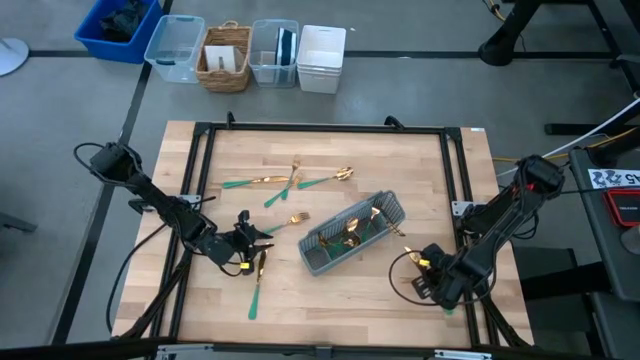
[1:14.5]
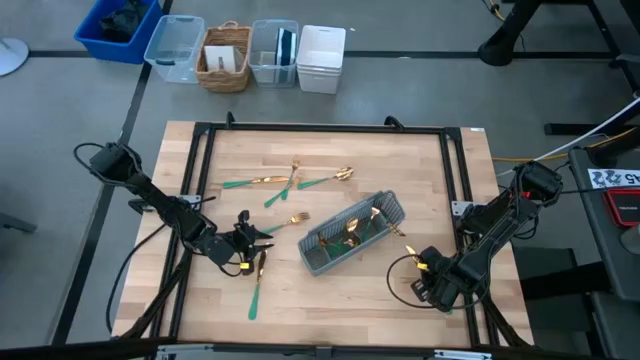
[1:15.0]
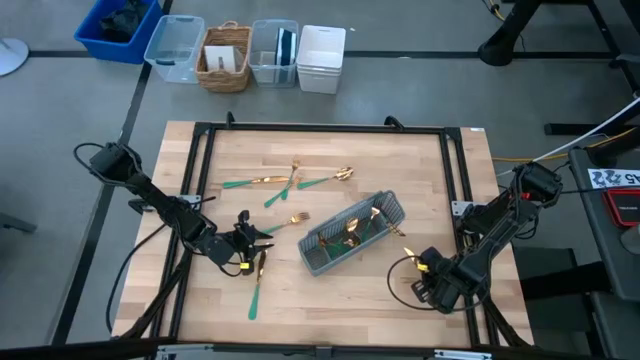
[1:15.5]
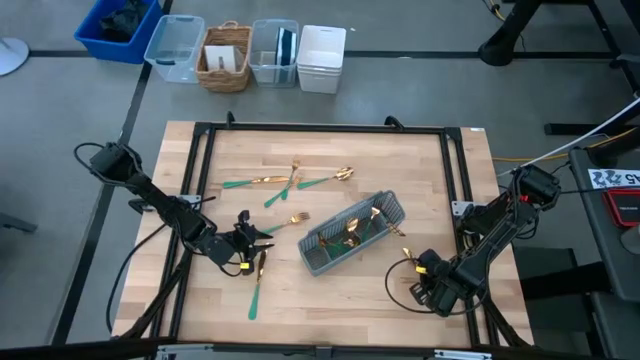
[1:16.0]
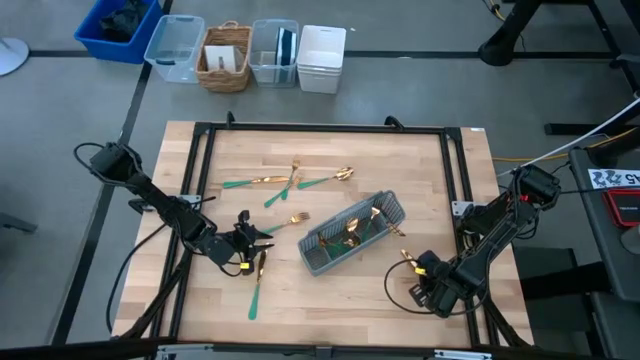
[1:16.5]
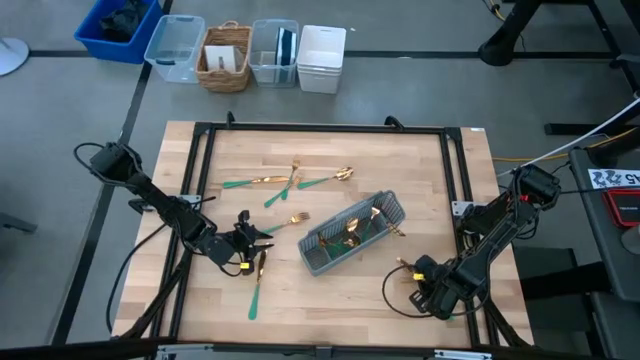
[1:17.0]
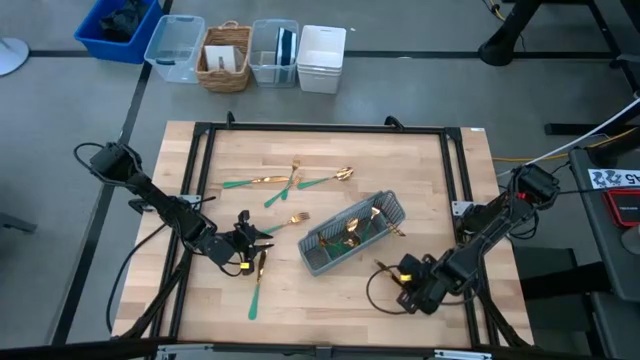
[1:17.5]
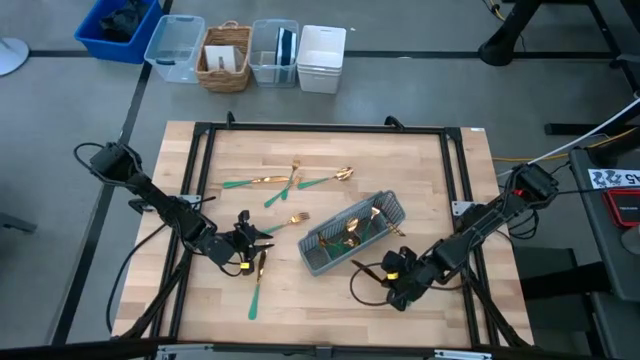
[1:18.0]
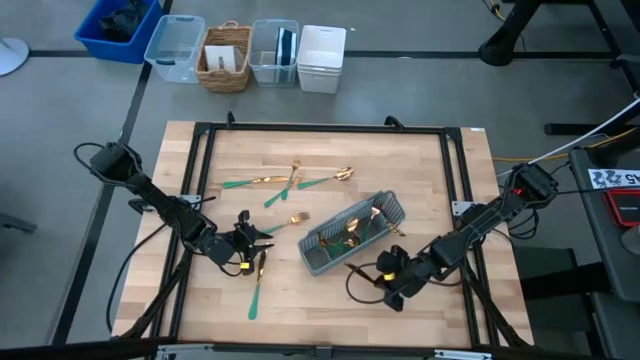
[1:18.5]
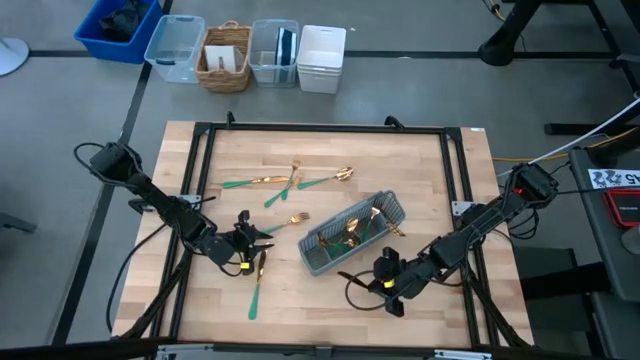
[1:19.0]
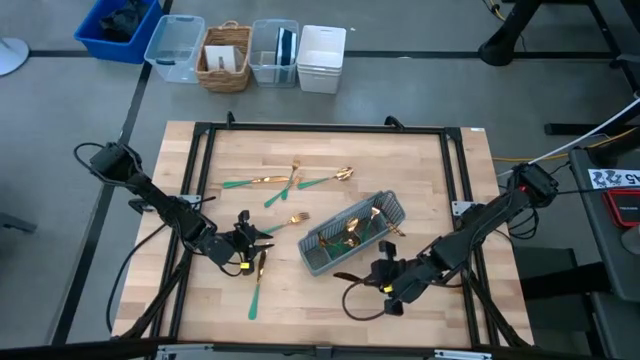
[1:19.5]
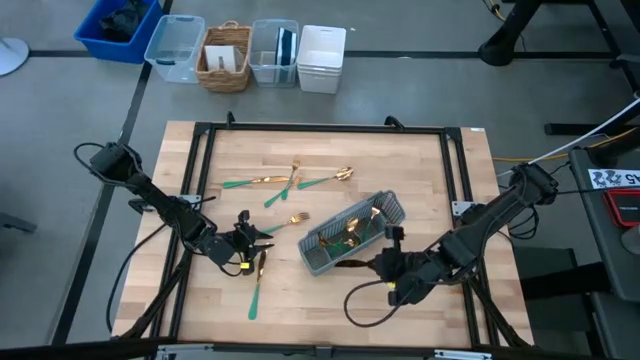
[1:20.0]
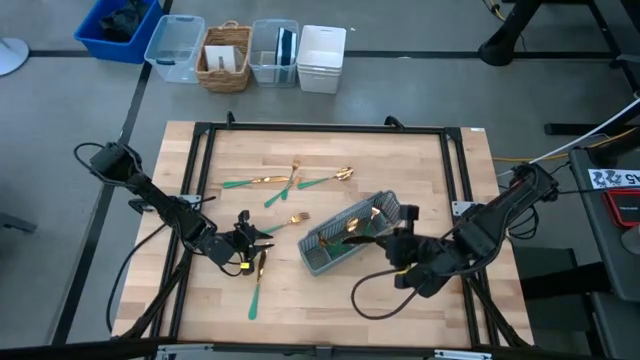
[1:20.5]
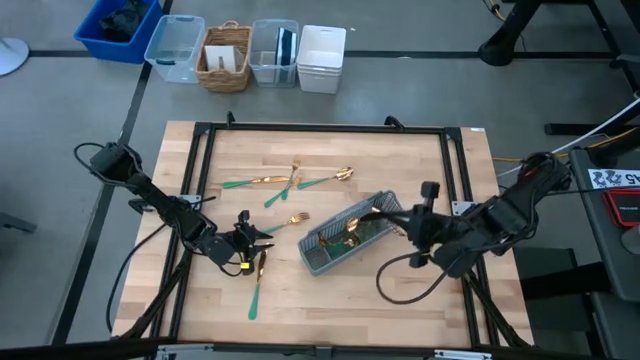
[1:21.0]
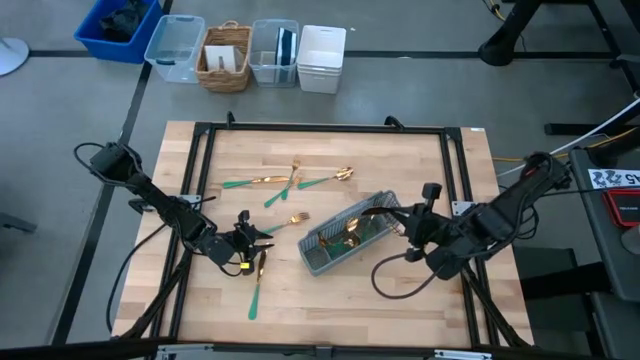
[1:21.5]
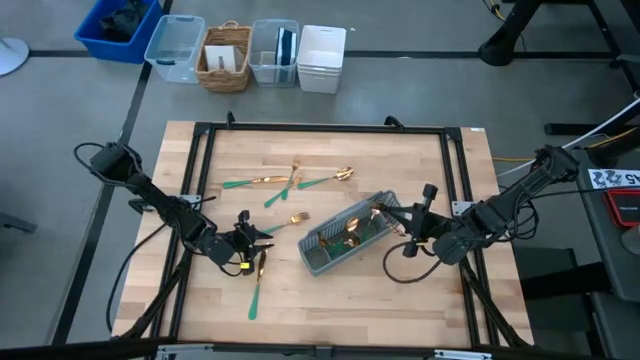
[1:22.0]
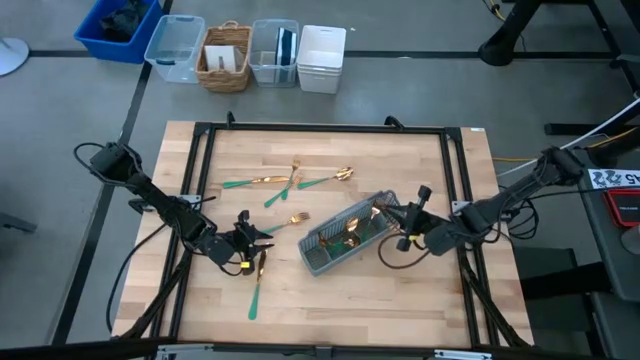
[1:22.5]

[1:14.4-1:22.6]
Task: Sort silverware
Put the gold knife into the gray silverware organizer

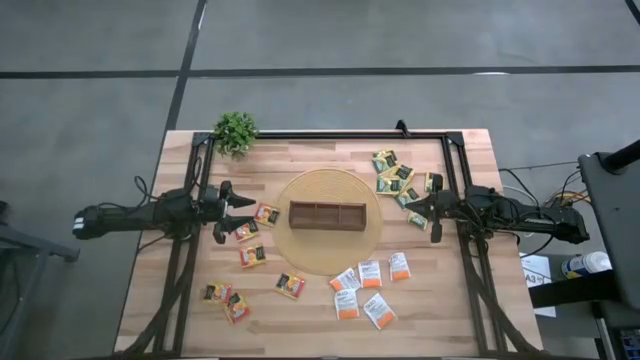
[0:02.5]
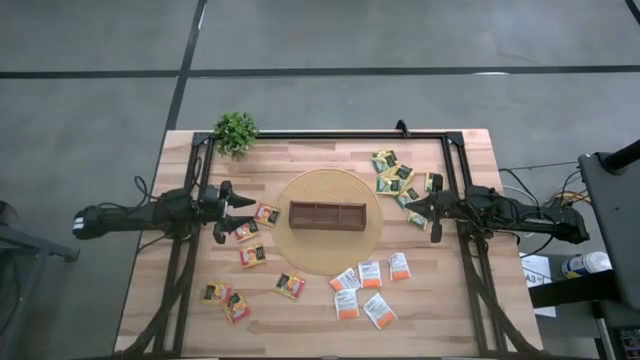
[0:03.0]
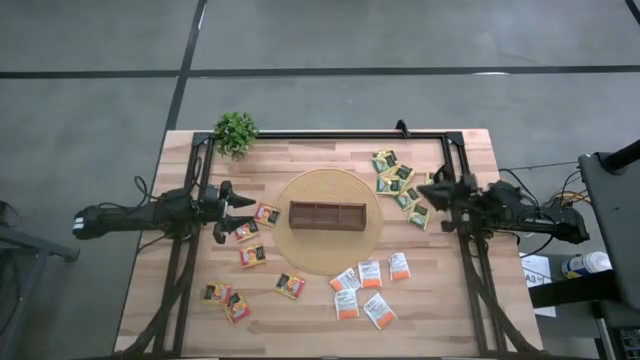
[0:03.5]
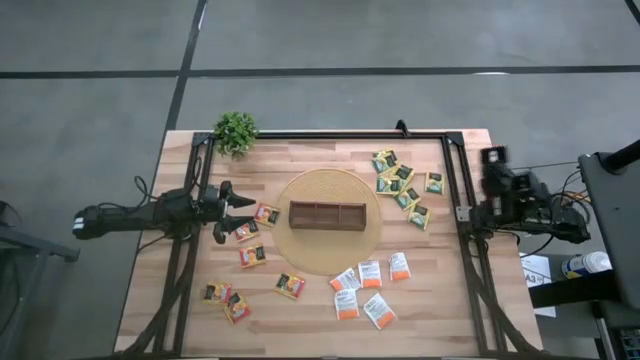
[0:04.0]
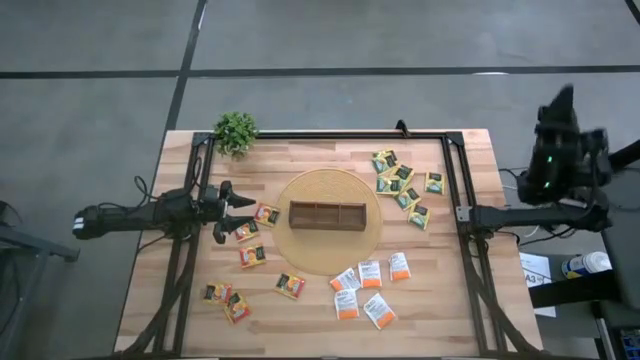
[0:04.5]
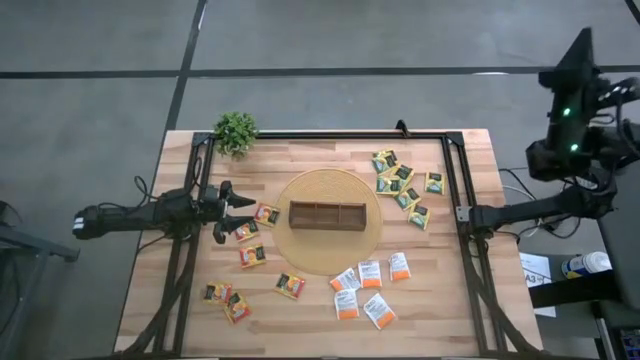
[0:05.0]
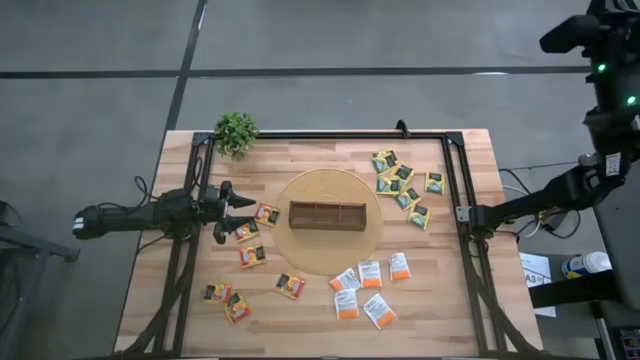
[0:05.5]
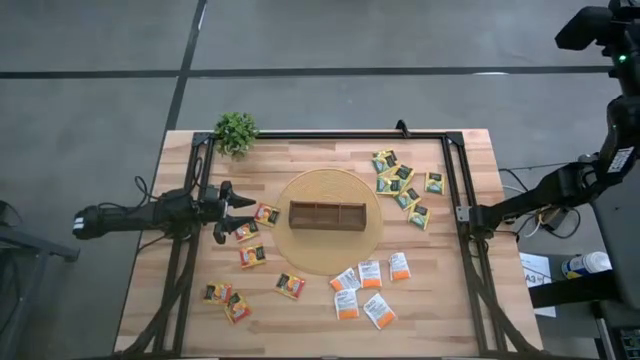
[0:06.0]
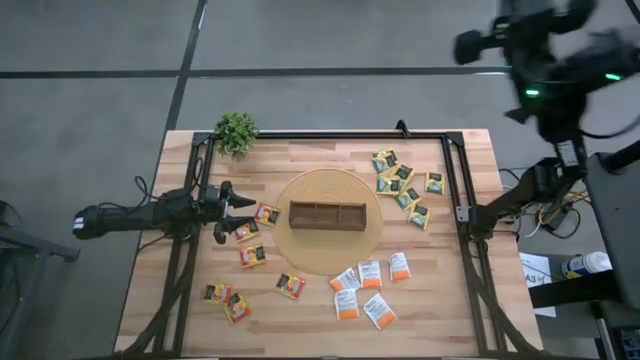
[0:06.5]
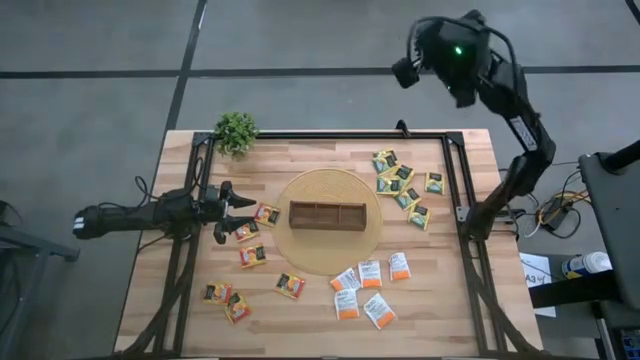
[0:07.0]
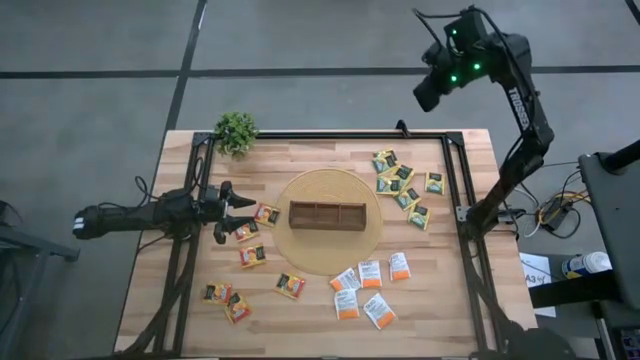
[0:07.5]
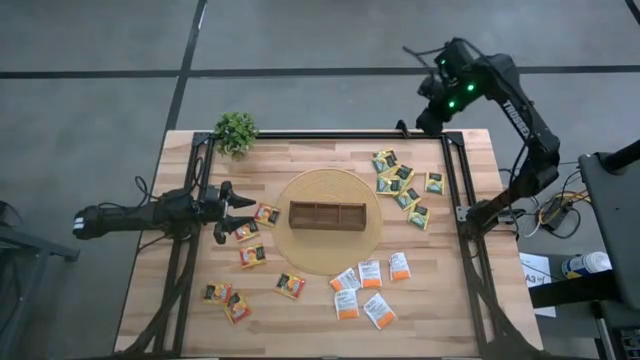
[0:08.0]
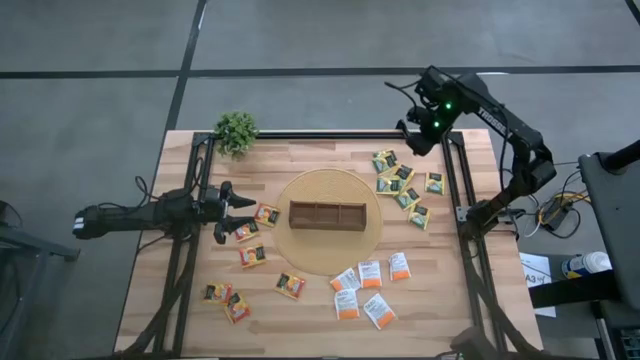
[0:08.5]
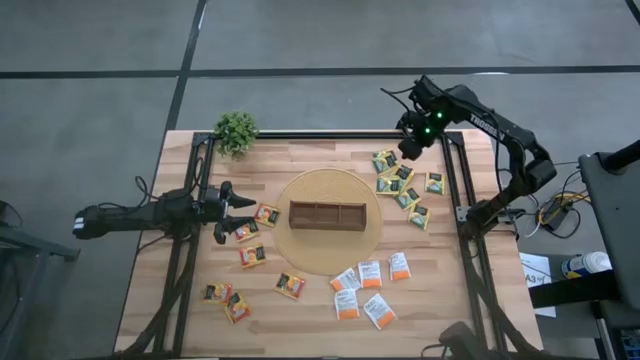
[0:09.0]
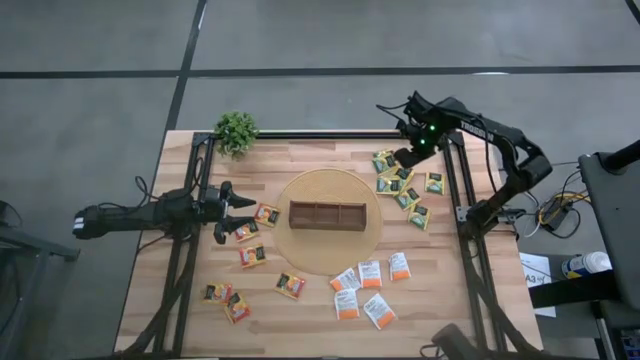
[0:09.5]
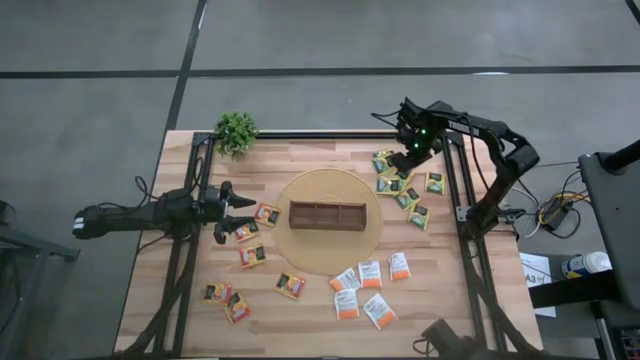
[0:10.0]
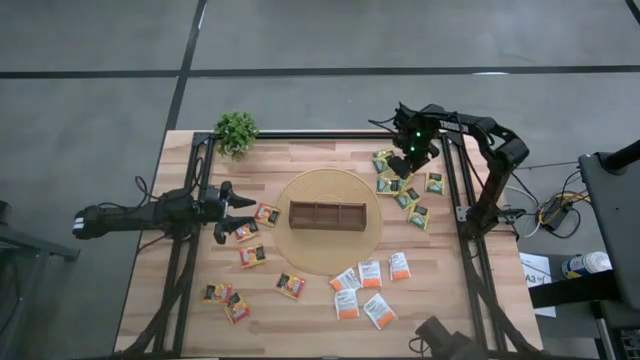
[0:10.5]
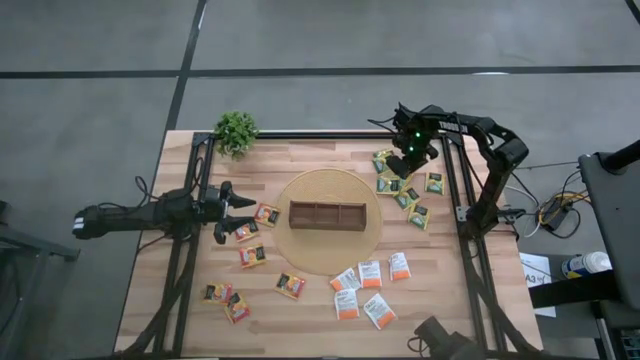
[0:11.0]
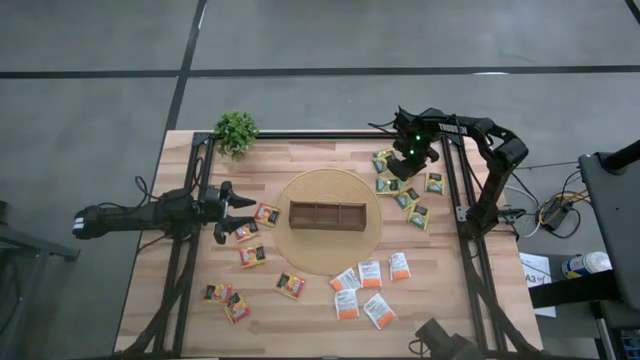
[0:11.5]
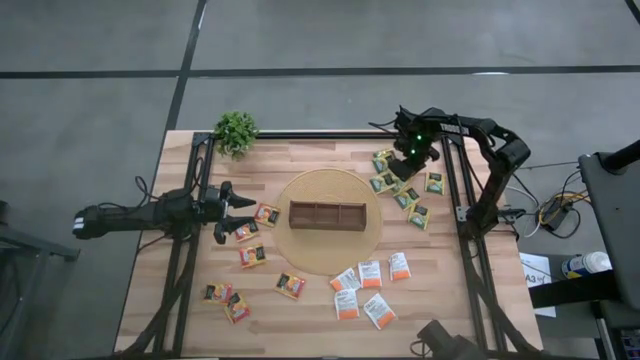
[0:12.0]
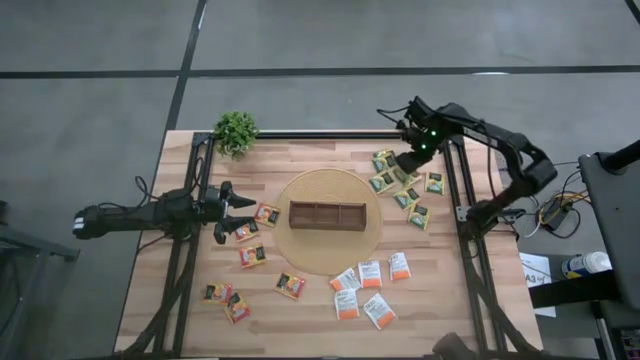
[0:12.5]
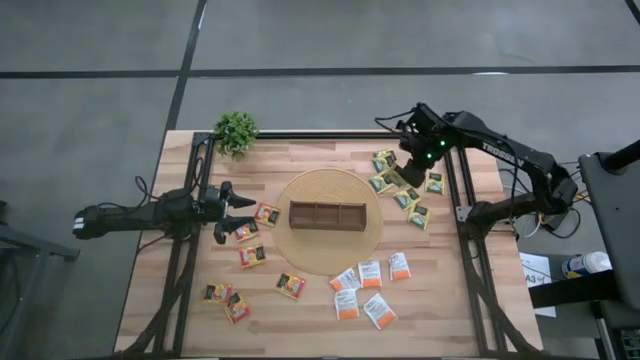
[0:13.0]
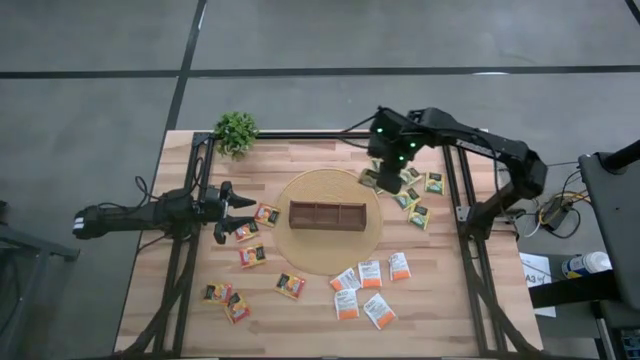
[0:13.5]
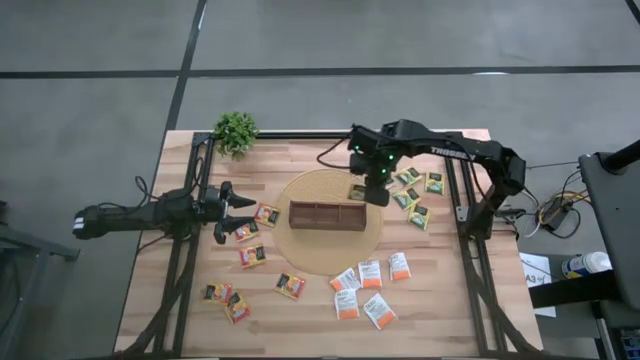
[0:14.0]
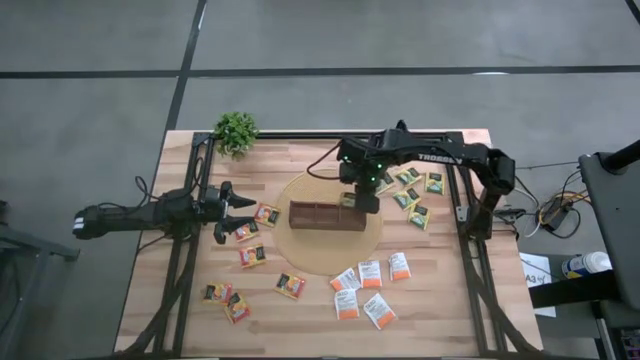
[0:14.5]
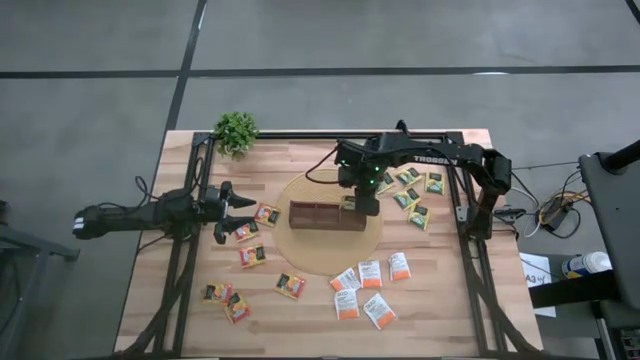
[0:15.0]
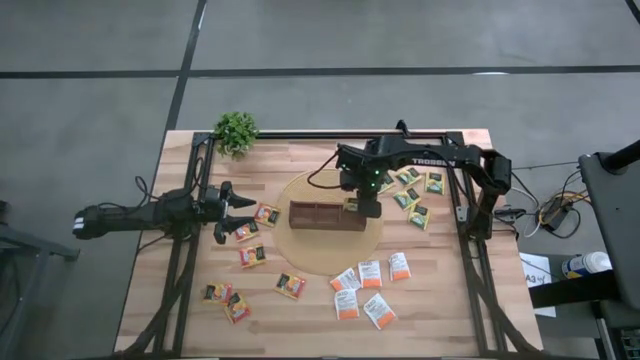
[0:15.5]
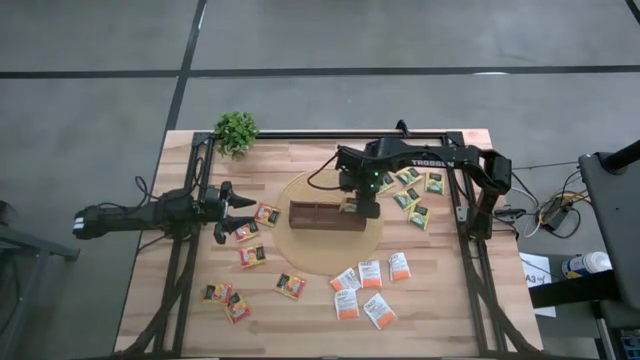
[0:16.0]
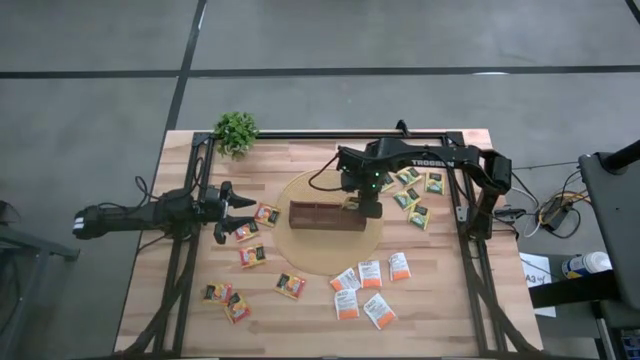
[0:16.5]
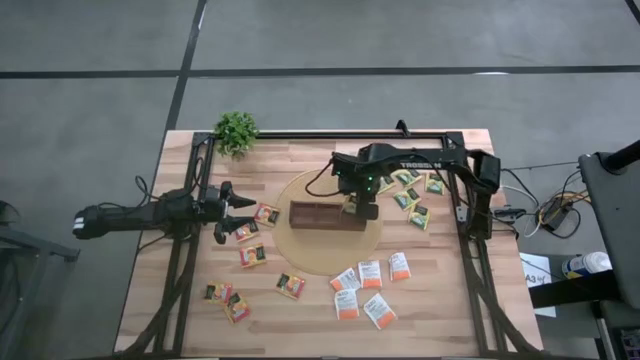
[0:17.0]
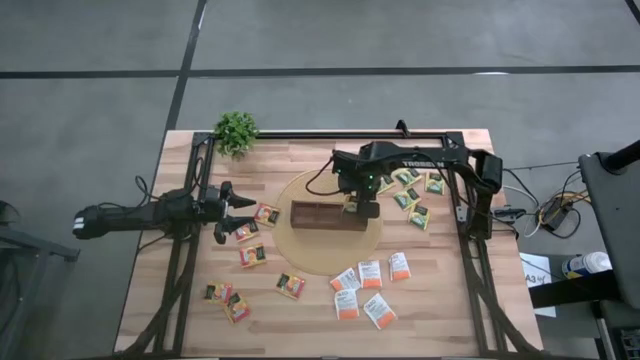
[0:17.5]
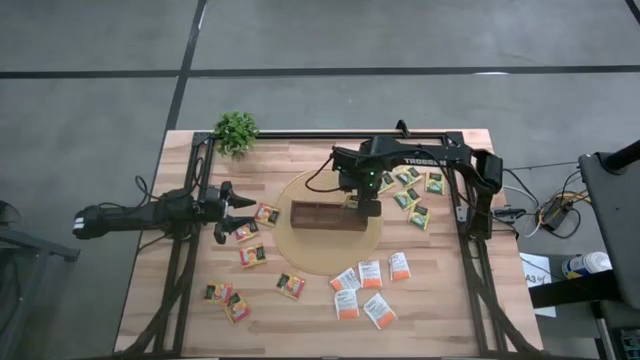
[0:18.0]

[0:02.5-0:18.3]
Task: Pick & Place Tea
Put the yellow tea bag into the right section of the wooden organizer
